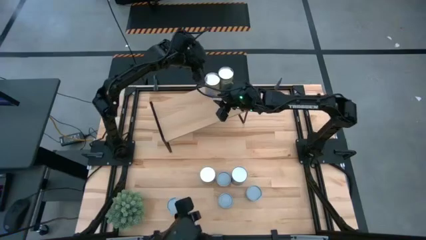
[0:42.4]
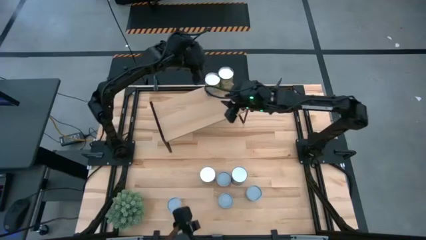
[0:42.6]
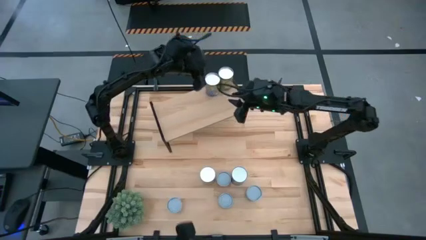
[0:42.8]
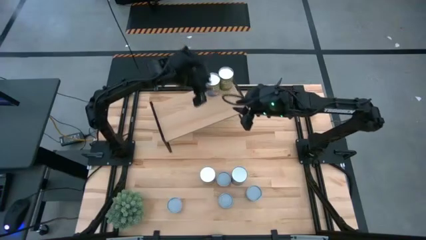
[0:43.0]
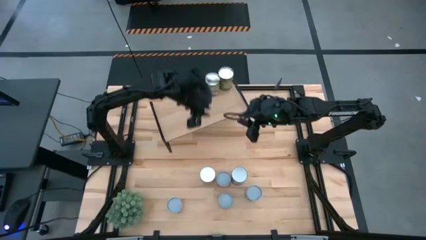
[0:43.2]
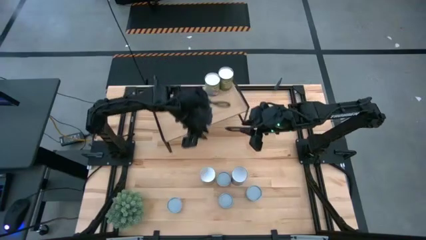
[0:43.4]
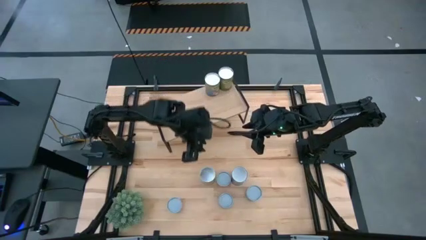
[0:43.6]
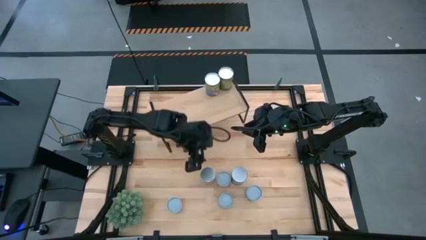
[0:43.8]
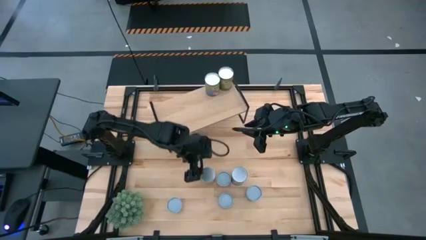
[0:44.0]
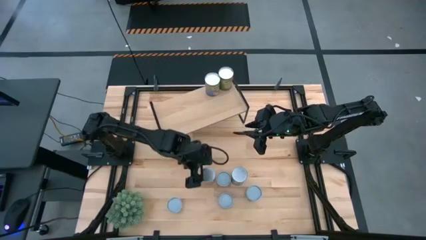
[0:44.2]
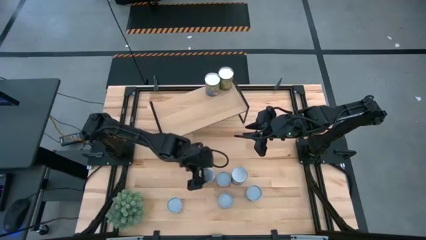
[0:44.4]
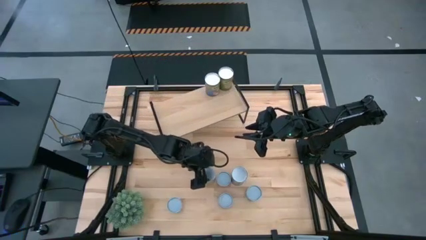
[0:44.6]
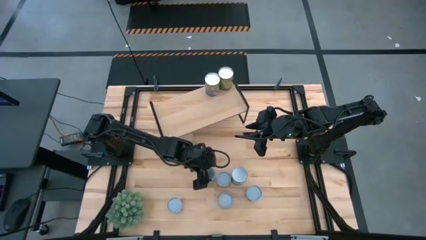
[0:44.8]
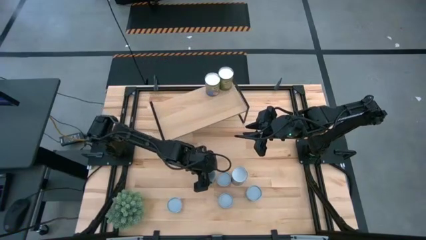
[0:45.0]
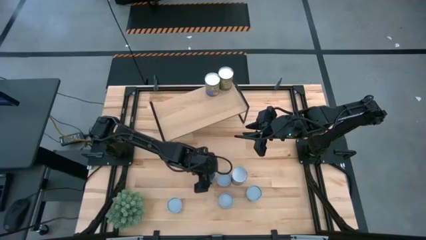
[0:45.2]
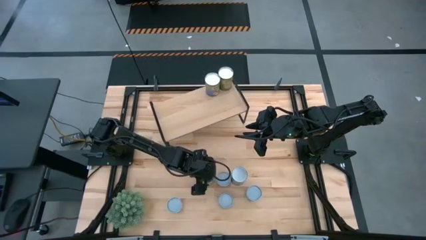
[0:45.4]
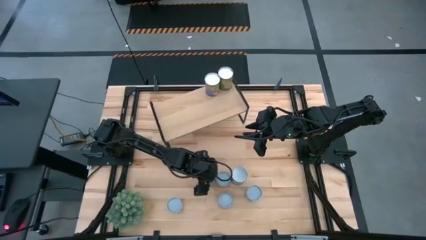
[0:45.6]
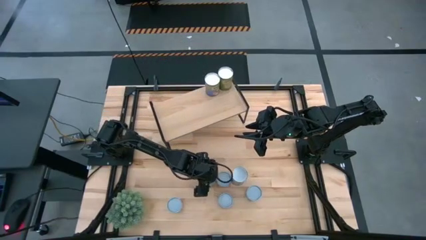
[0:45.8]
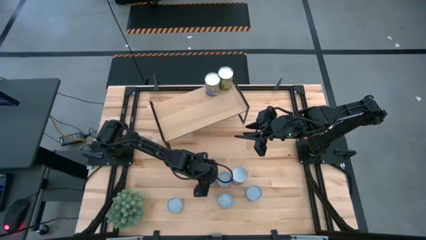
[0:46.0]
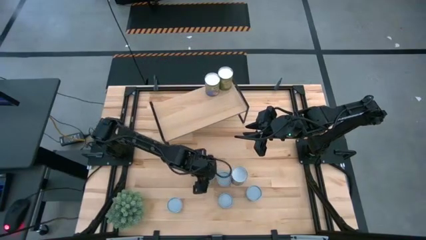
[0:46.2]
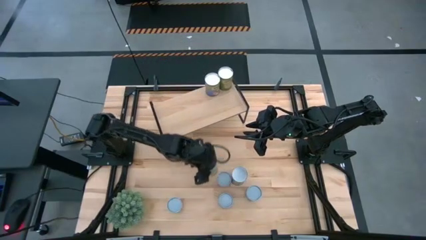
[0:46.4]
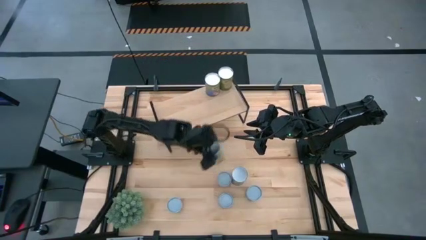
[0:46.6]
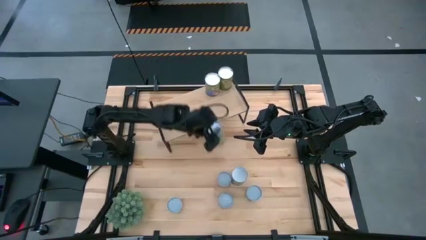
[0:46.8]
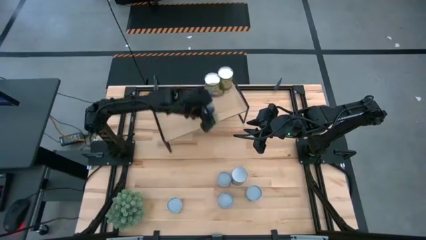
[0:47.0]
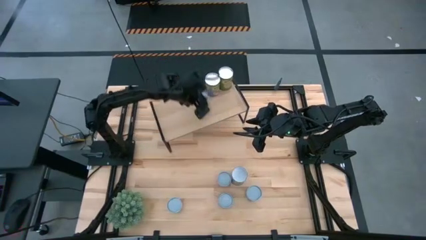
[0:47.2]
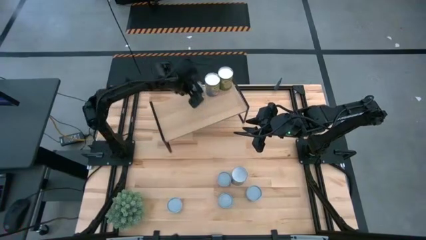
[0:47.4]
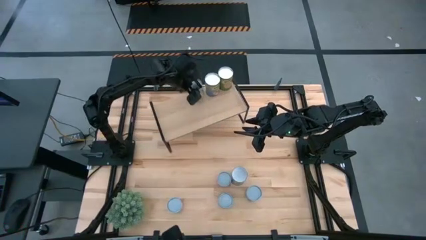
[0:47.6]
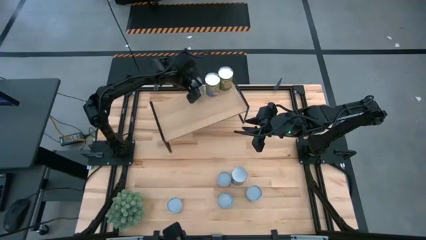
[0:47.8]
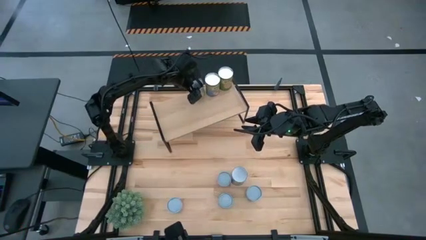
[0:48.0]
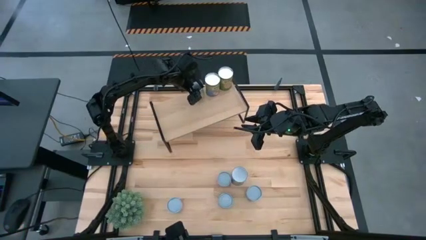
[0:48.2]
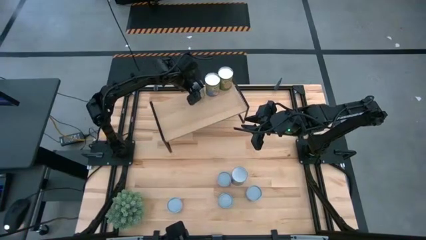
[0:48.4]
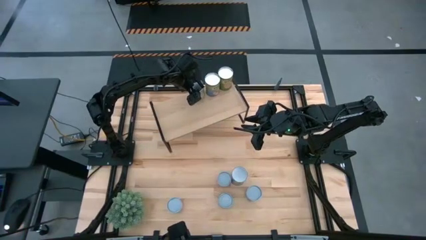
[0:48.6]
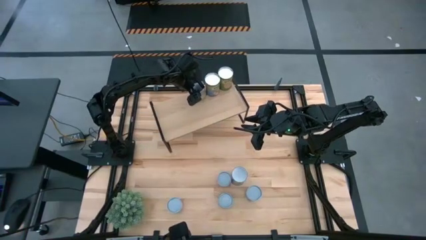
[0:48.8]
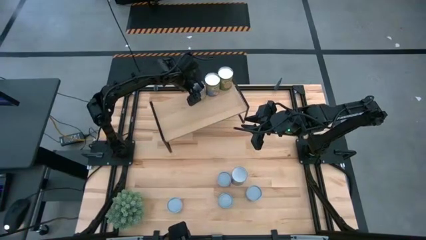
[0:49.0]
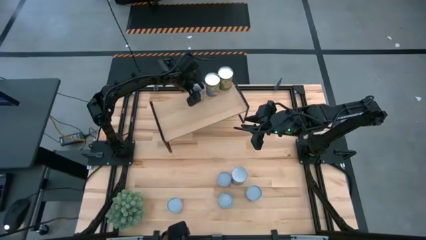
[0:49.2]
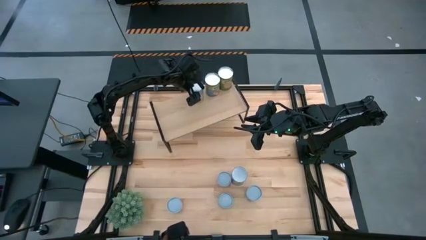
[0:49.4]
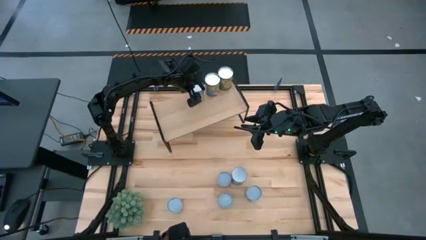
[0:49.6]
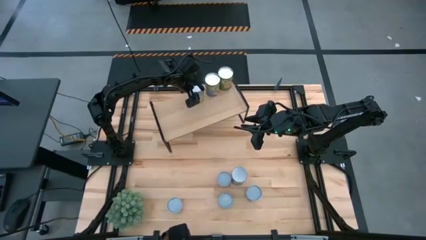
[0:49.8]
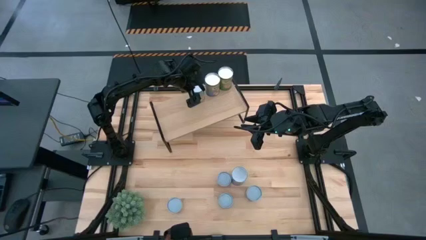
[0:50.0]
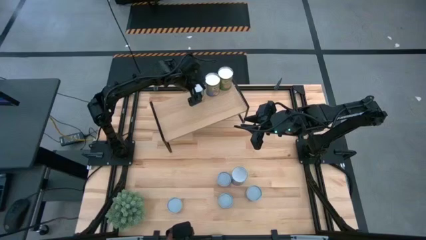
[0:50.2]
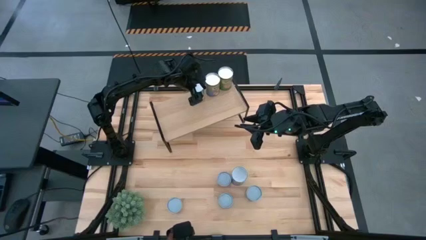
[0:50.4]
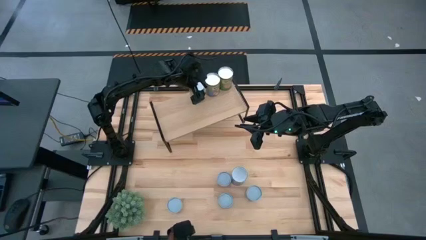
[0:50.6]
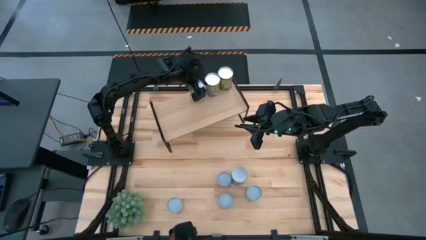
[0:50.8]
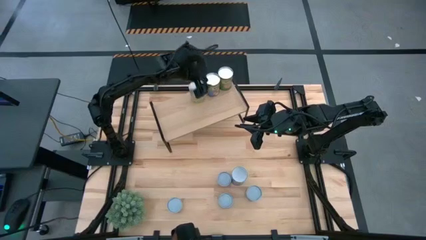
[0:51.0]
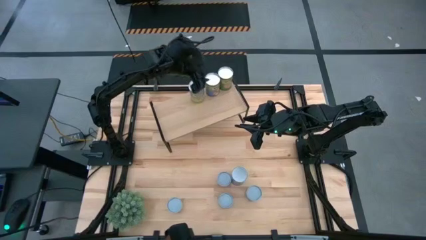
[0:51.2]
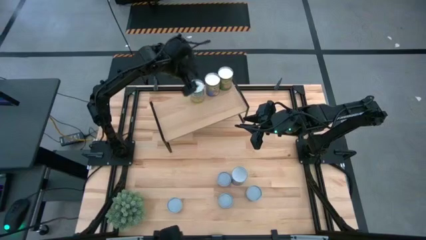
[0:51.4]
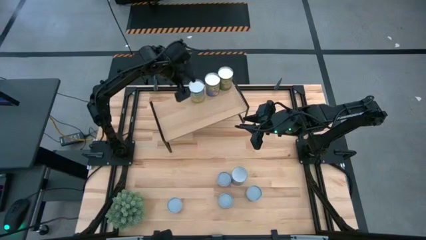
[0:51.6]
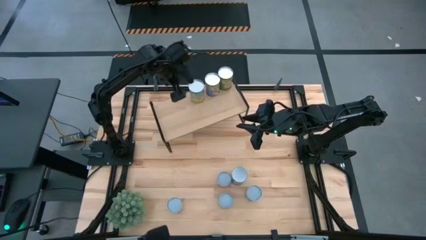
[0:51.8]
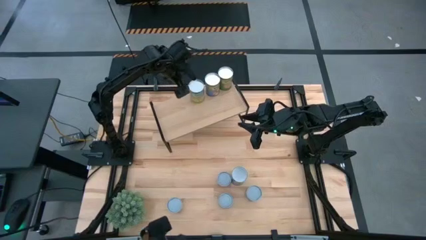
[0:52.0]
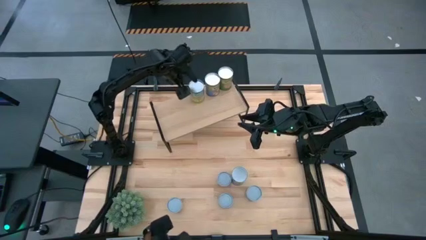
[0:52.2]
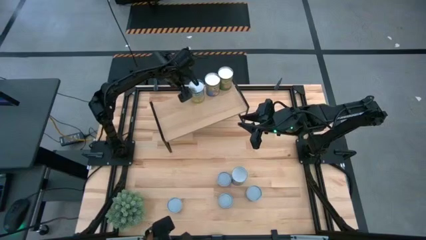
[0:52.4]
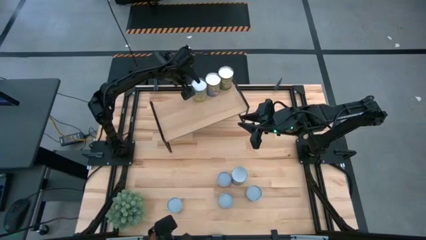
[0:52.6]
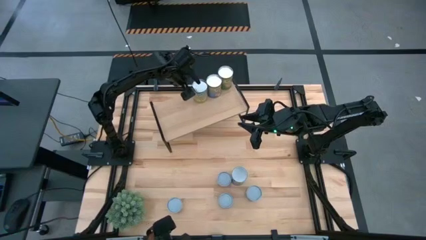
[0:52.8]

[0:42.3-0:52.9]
Task: Pick and place cans onto a shelf
Put the canned carrots on the shelf
